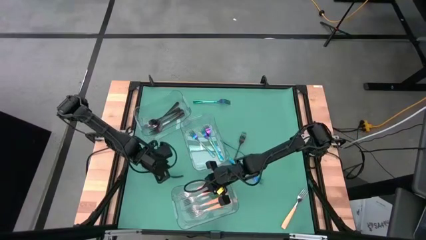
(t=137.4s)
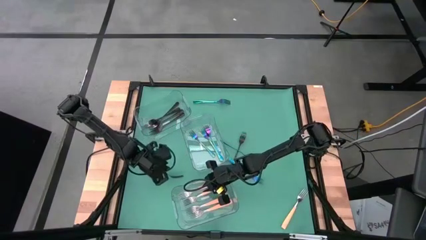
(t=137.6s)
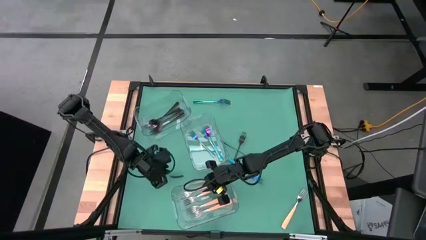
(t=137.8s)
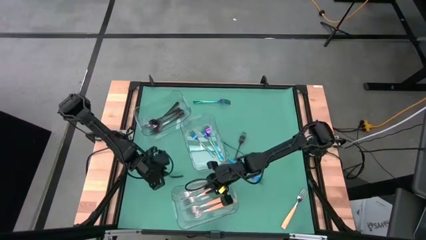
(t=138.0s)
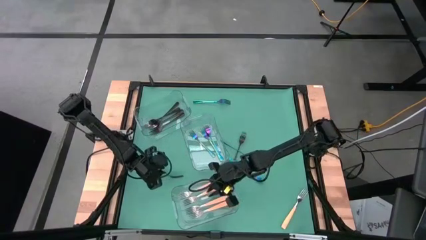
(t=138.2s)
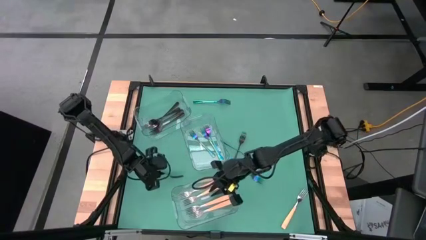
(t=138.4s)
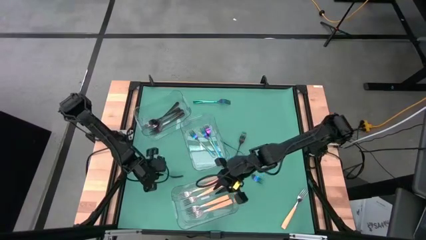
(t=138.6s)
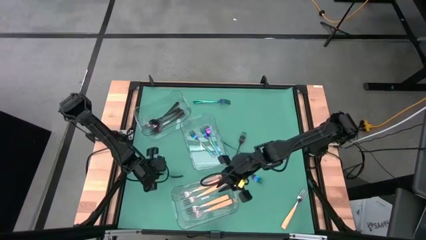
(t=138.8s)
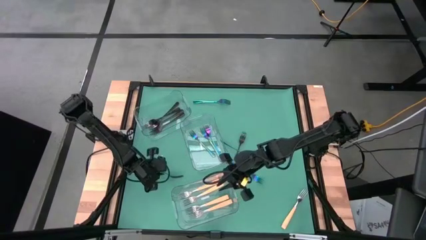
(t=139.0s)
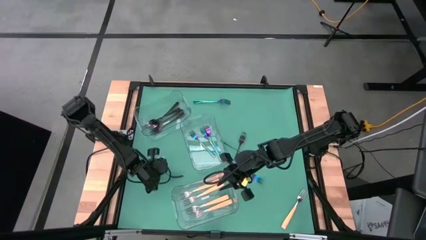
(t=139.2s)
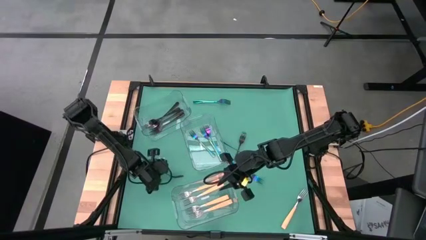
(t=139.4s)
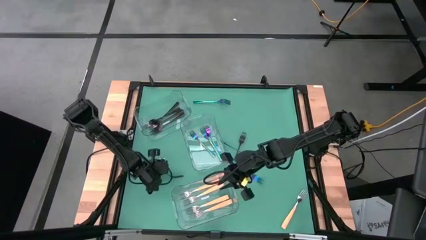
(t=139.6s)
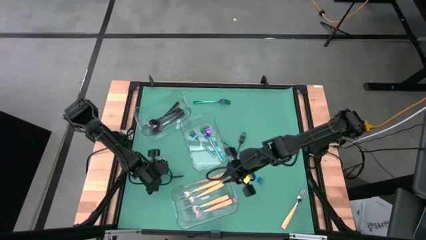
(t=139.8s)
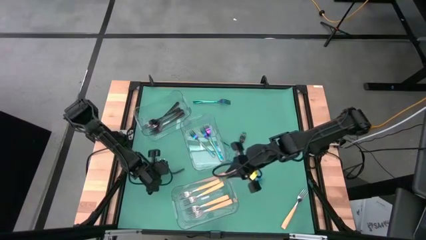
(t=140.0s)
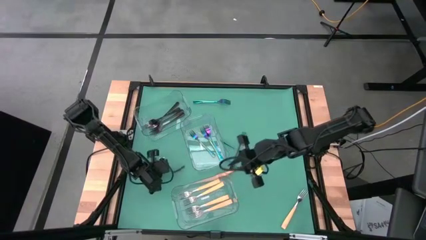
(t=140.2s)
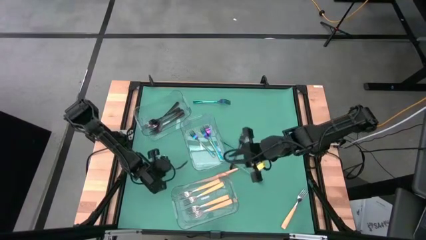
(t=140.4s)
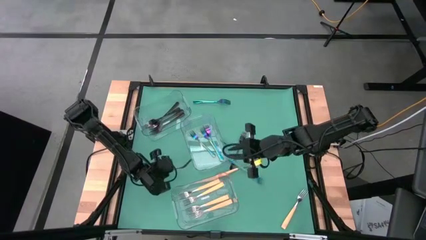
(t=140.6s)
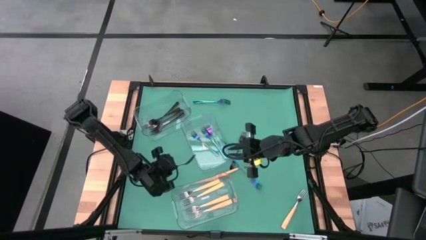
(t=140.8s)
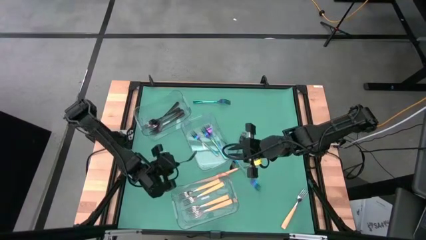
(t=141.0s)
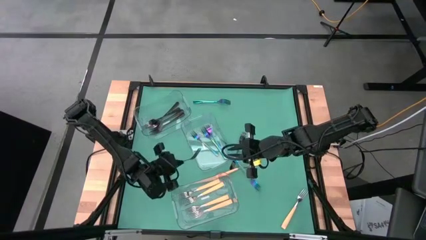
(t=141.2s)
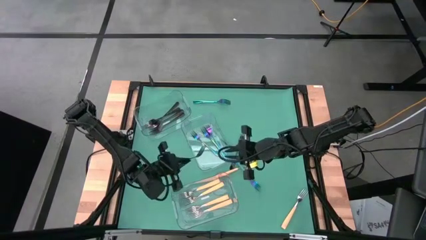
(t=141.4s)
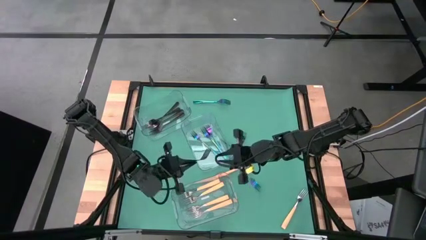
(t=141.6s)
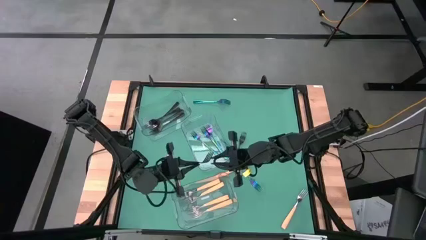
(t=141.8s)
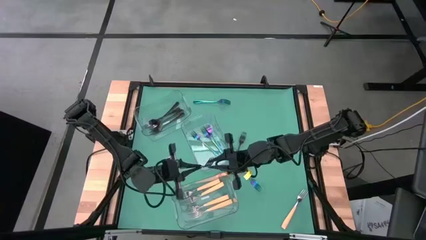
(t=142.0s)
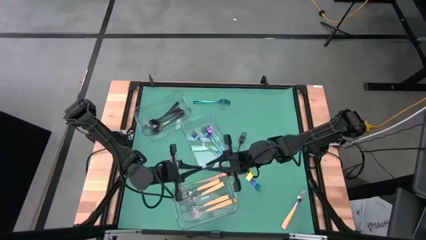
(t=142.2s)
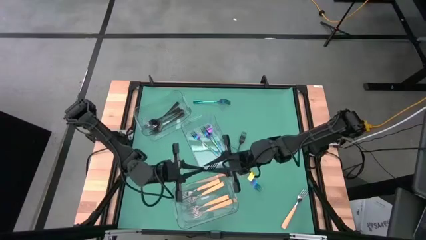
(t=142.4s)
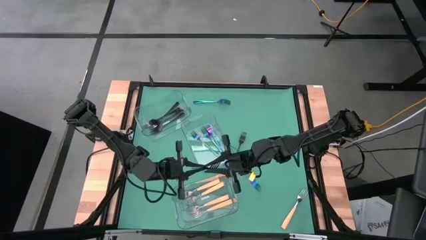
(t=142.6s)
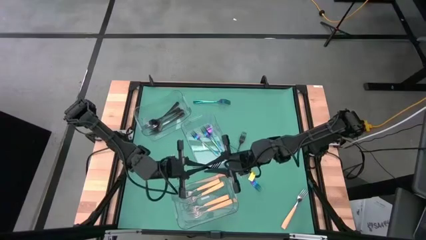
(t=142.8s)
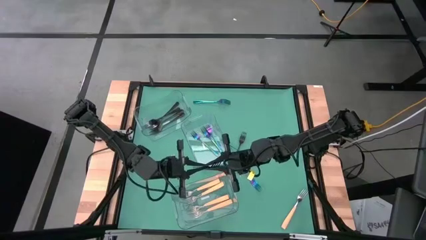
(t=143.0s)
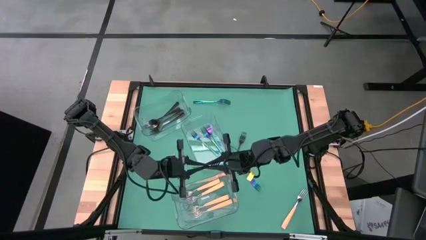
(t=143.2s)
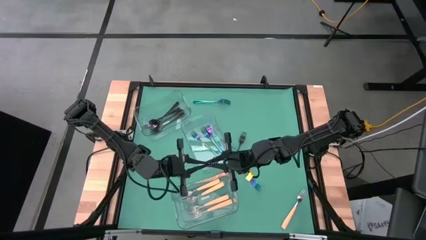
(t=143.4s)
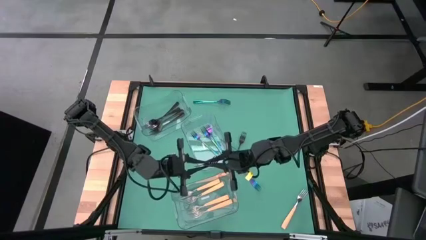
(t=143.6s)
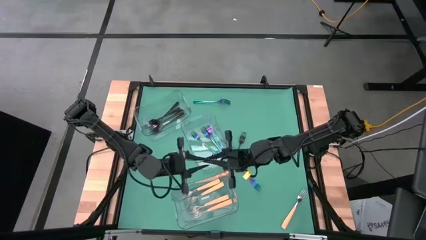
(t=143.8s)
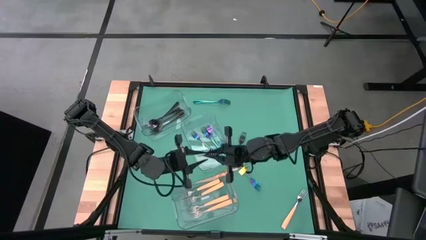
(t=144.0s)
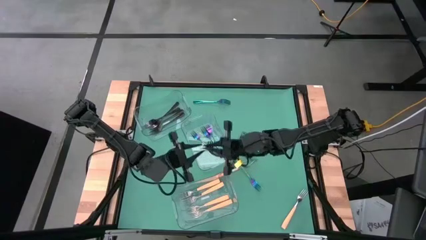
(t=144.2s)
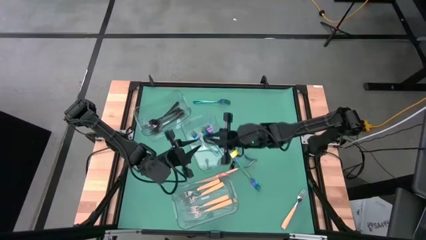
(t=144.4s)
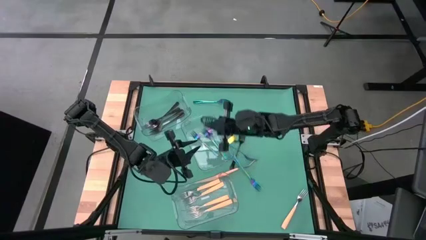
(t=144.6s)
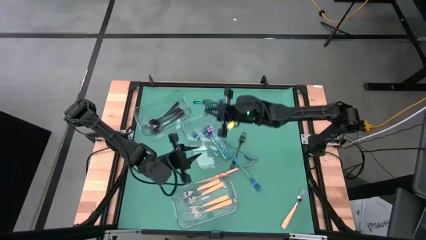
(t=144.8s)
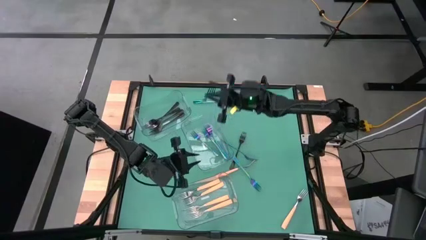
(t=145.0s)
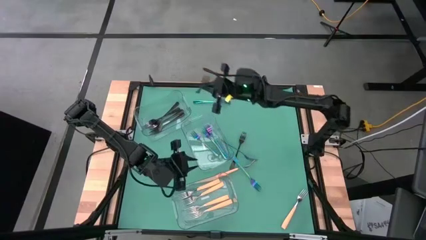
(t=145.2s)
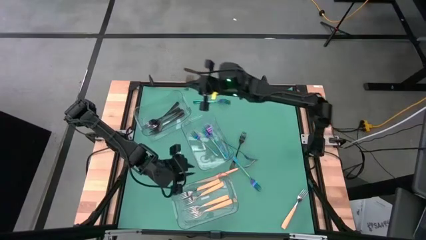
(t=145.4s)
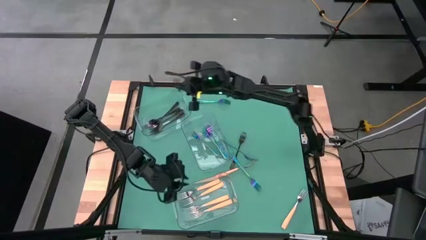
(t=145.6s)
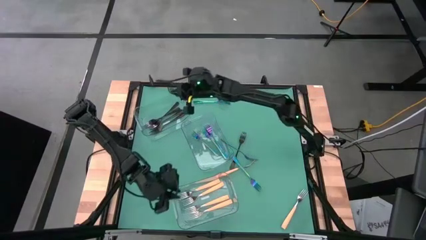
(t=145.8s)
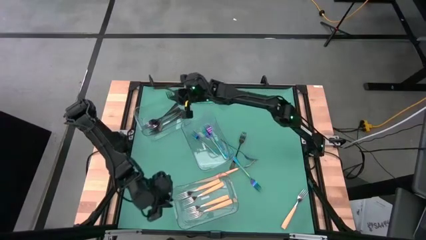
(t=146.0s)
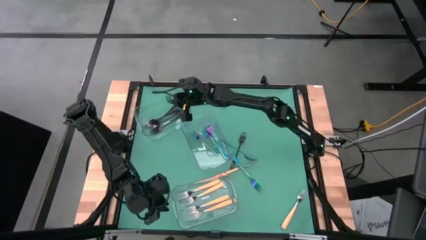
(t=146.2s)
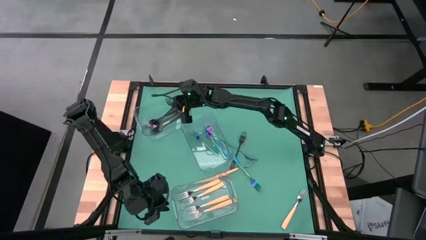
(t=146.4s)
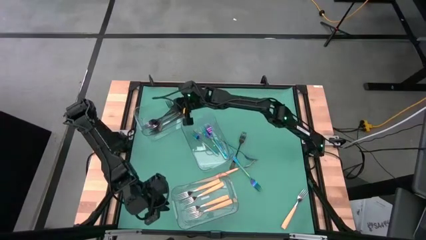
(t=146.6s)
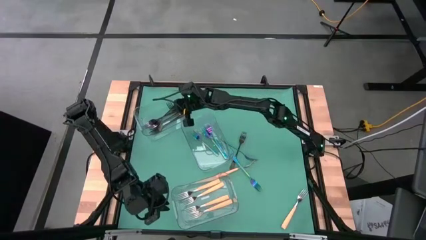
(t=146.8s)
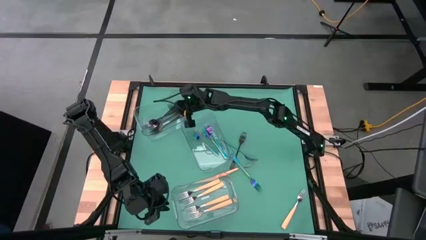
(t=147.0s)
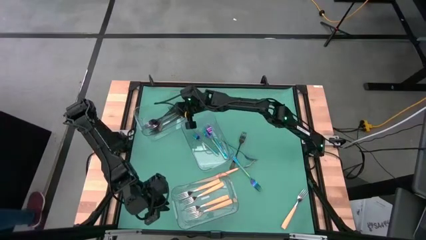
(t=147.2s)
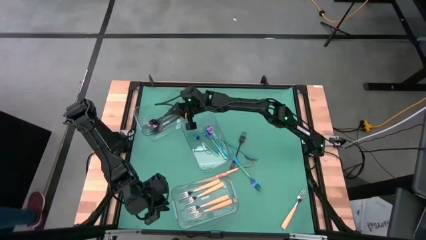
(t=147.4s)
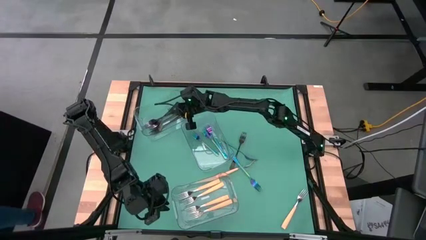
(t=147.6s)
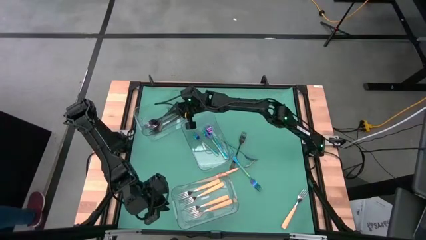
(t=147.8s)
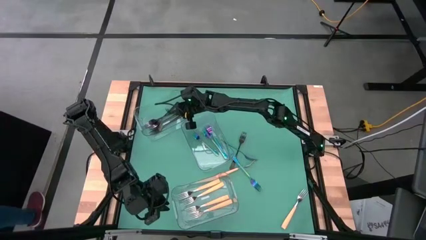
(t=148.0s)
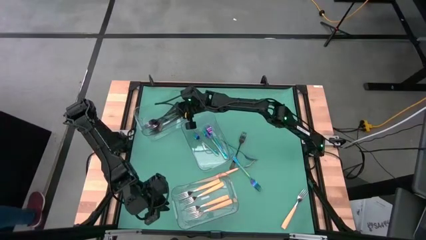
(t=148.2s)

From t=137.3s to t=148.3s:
Task: Sort silverware by color (type)
Put the black fork into the top transparent bin

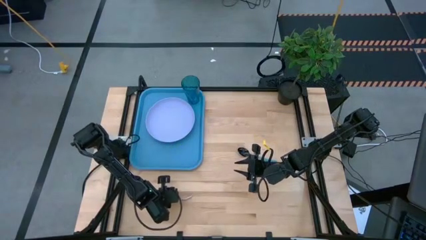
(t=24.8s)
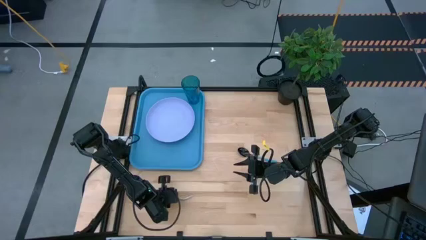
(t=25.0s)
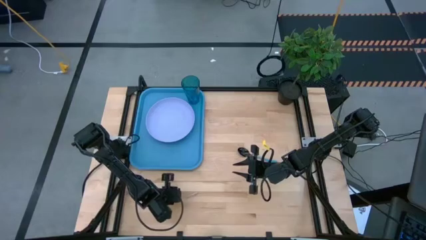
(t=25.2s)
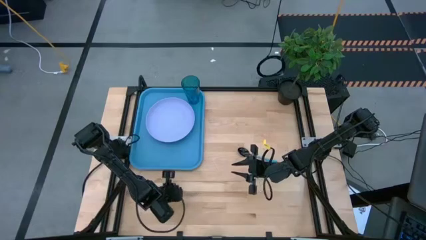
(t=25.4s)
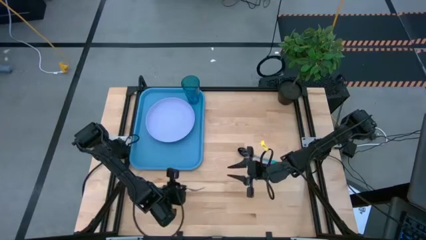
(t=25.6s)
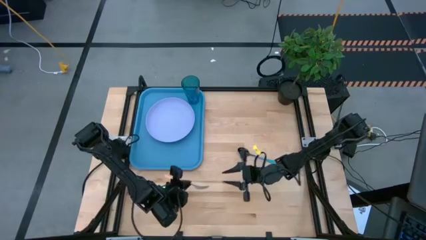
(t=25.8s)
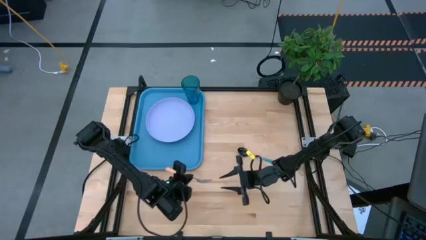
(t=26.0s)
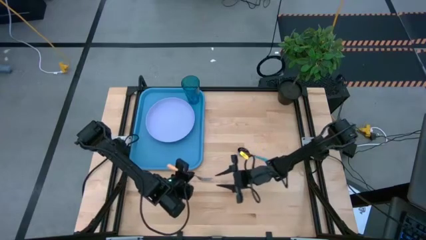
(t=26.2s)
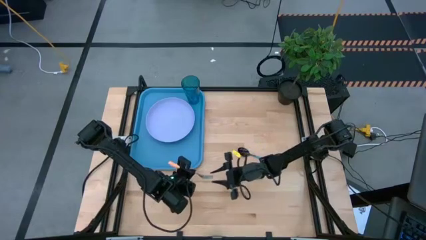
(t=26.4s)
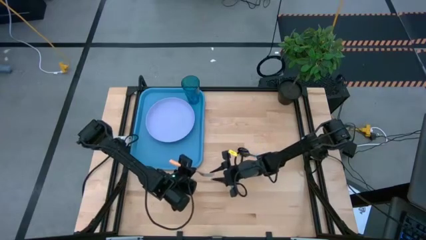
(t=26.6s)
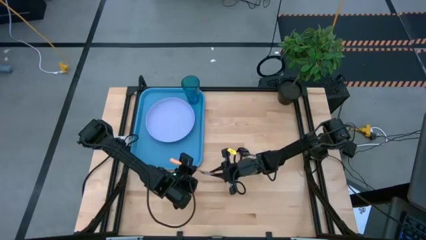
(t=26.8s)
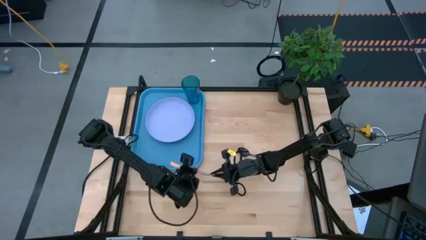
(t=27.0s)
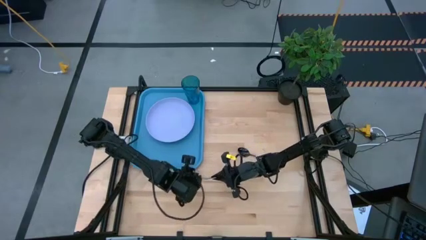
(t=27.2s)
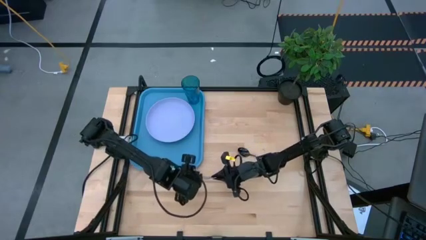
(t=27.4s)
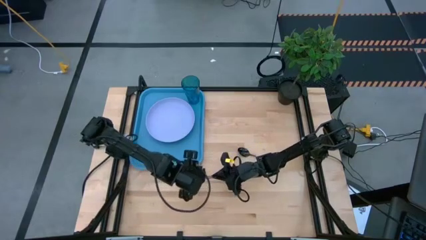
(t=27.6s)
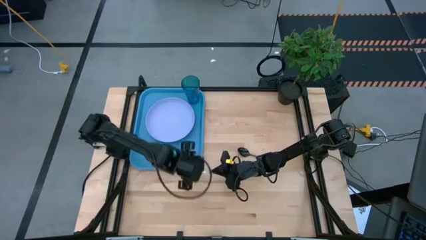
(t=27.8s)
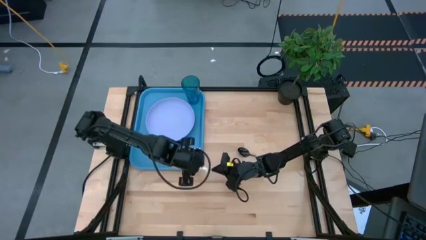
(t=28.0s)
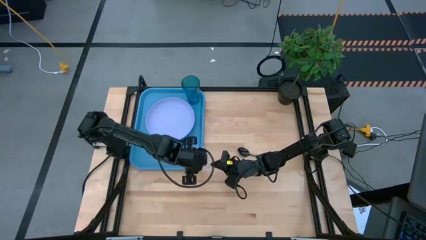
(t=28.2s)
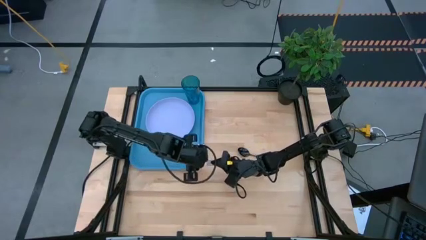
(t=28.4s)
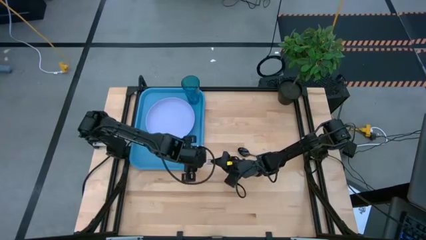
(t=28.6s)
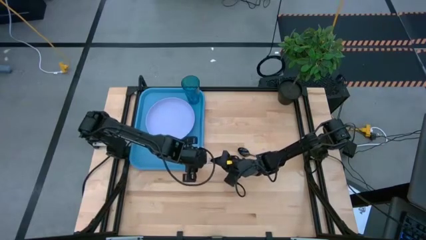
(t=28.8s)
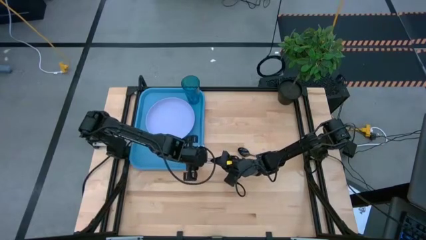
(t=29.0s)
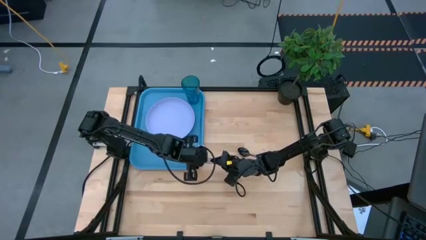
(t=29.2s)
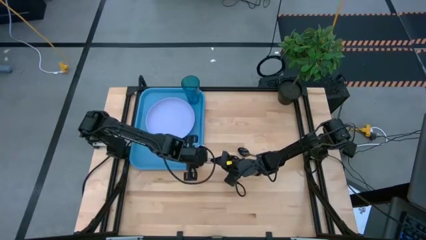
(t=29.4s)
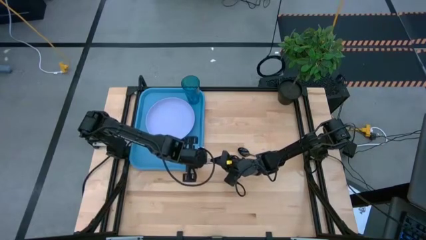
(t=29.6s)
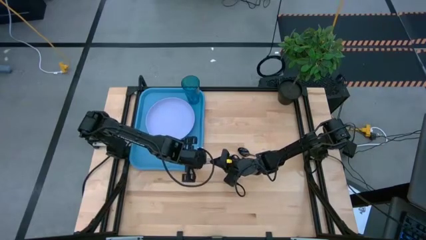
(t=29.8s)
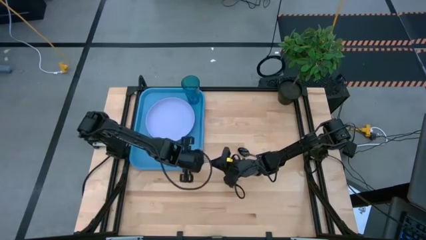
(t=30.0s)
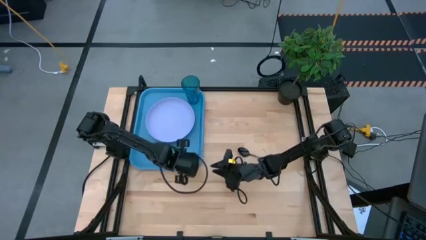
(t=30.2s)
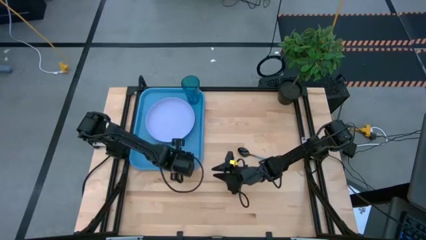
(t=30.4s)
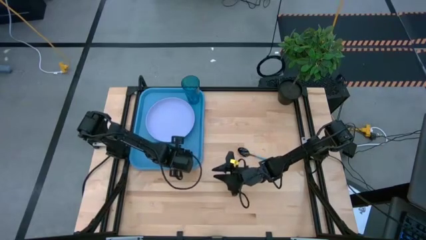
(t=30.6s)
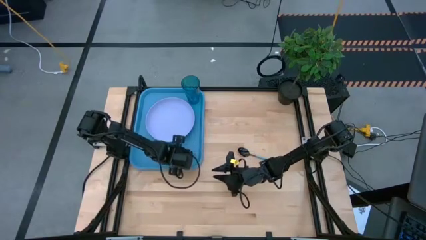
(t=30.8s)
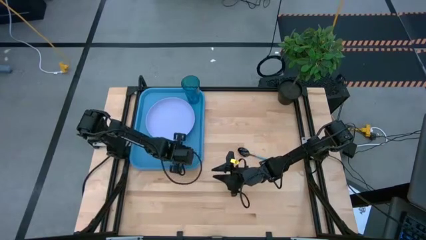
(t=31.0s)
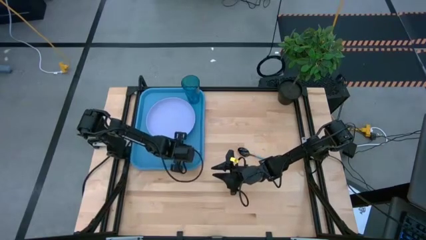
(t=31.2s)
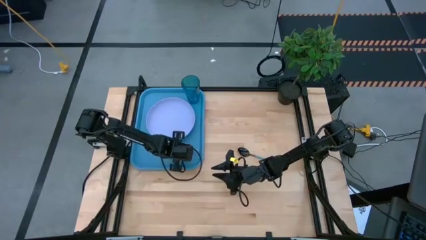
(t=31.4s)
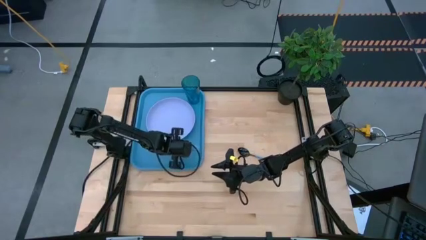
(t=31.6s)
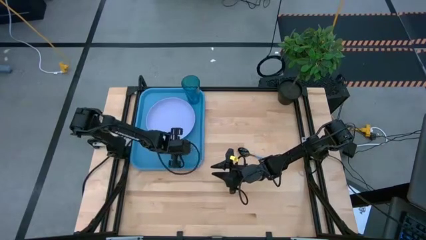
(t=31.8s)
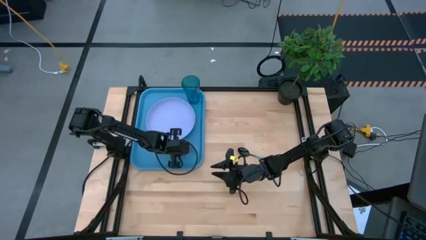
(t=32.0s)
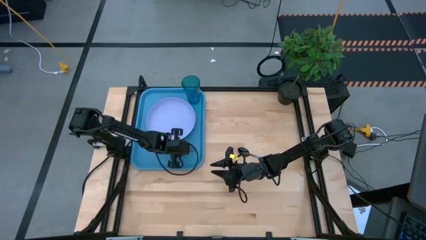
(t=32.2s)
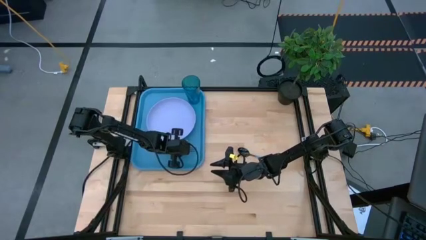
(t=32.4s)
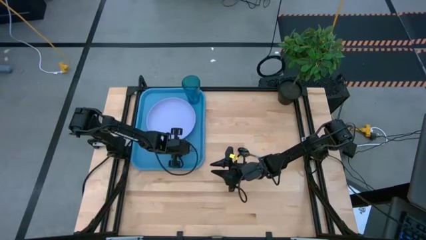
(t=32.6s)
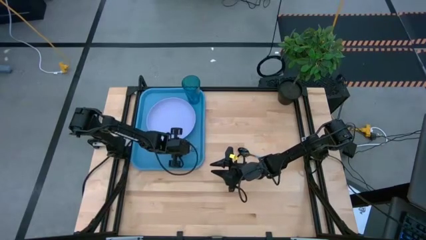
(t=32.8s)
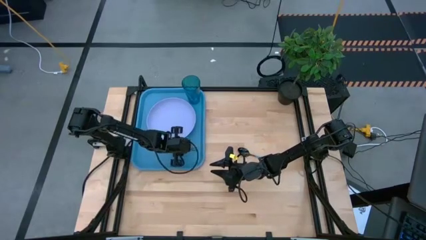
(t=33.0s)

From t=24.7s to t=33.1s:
Task: Pick and place plate/cup/fork/spoon on tray
Put the yellow fork on the blue tray
